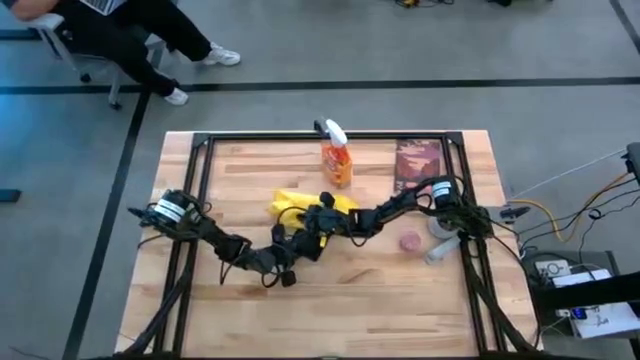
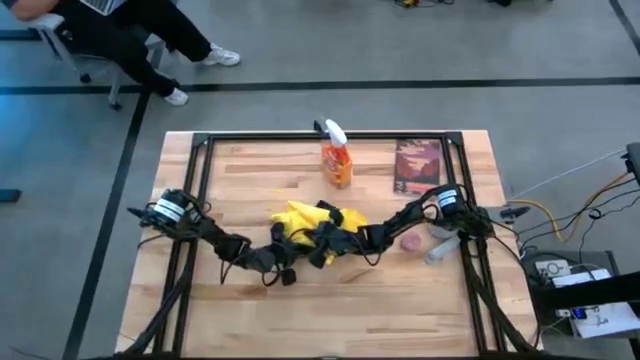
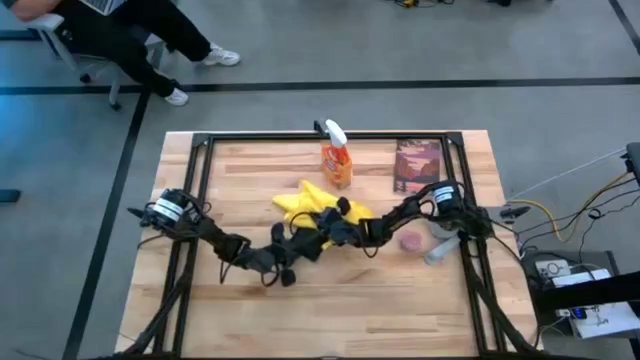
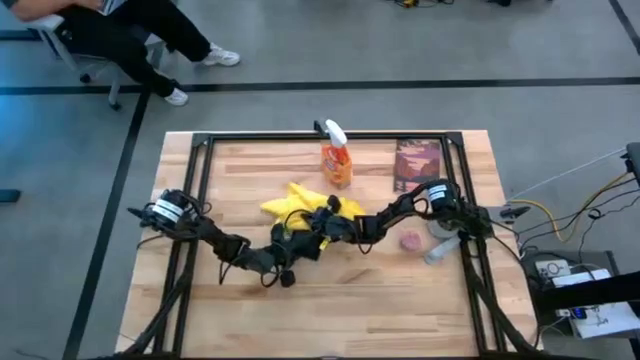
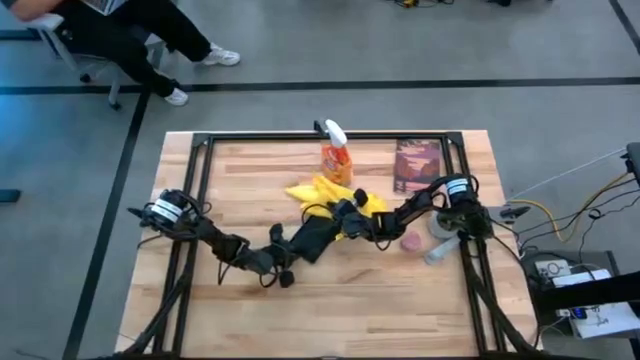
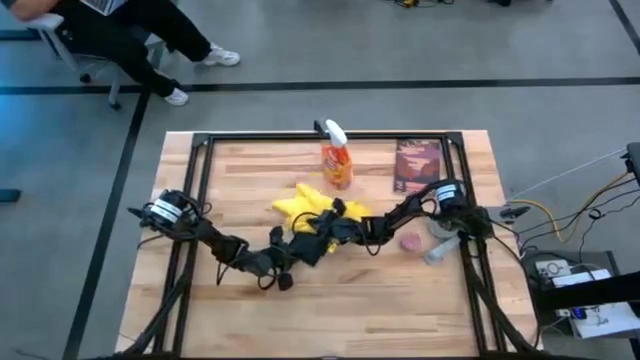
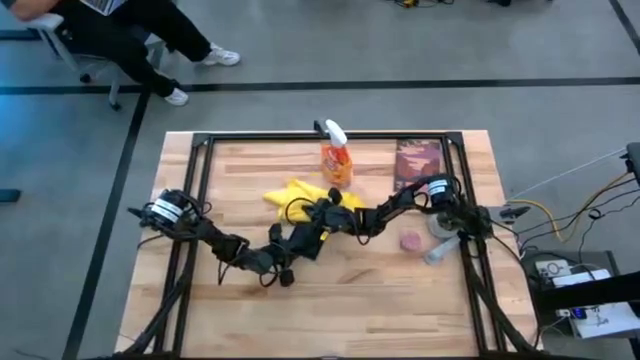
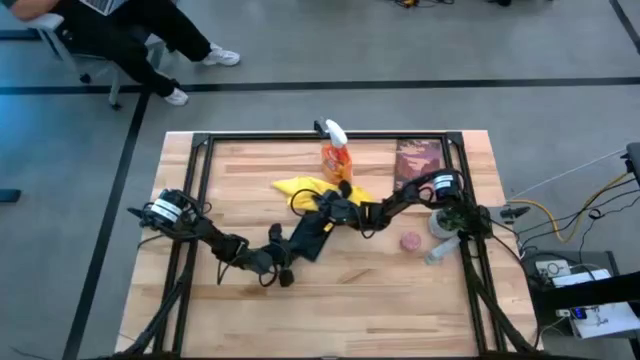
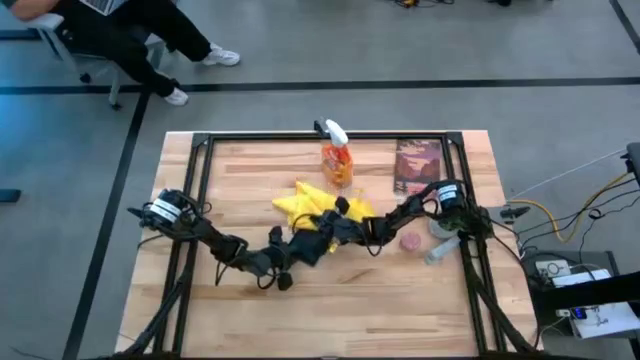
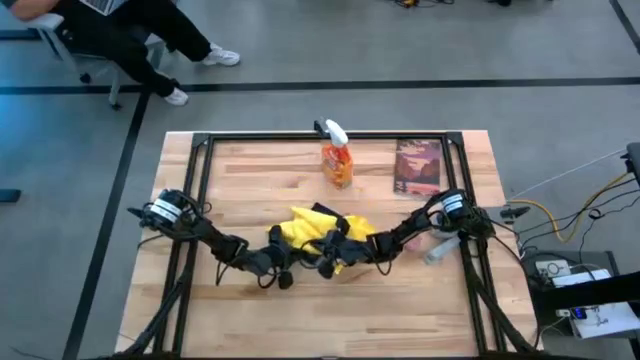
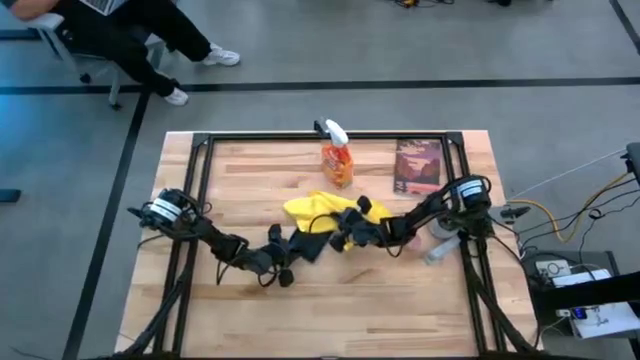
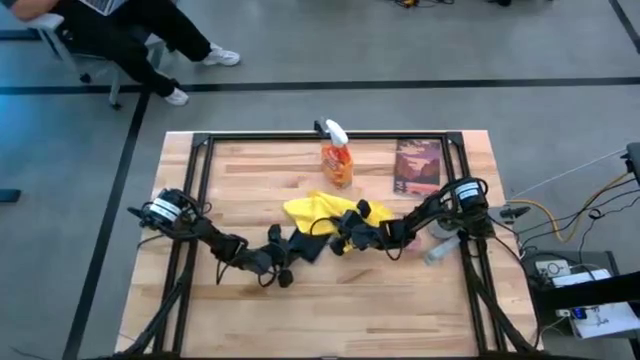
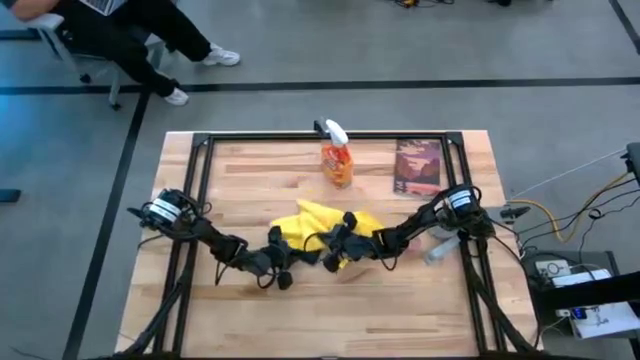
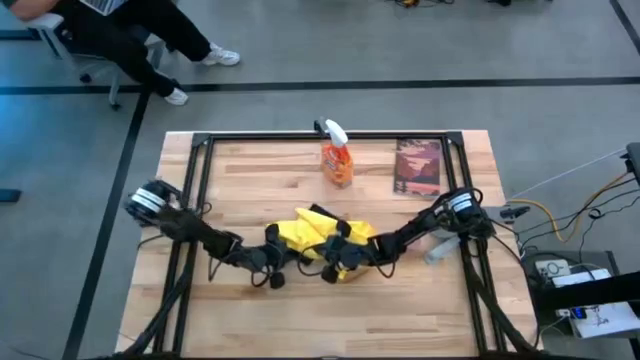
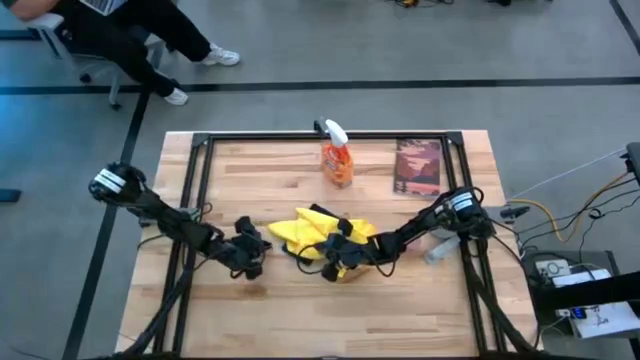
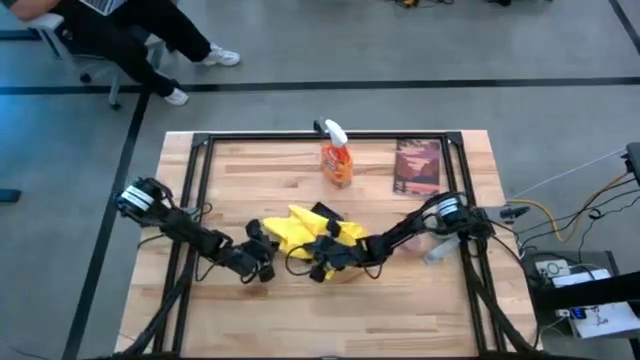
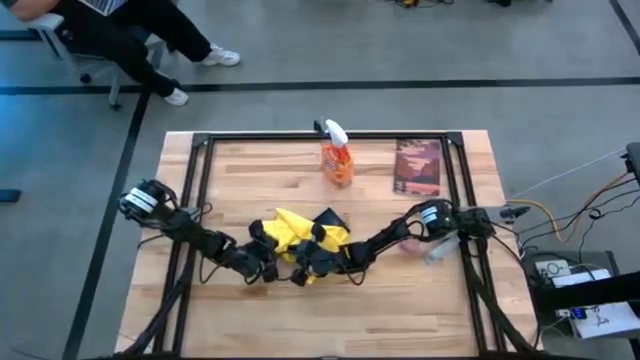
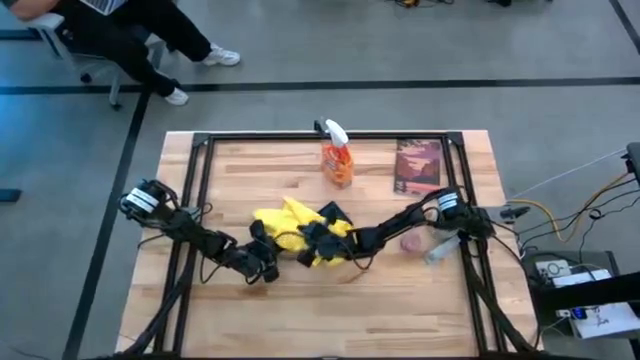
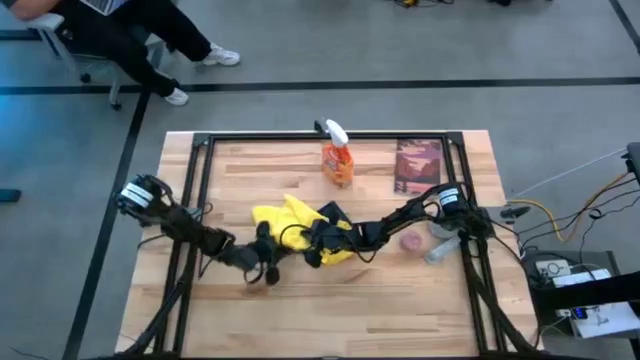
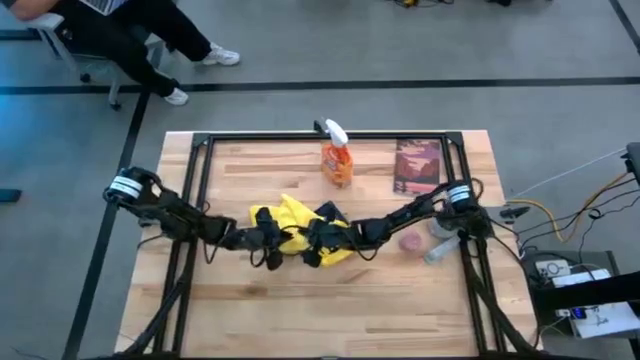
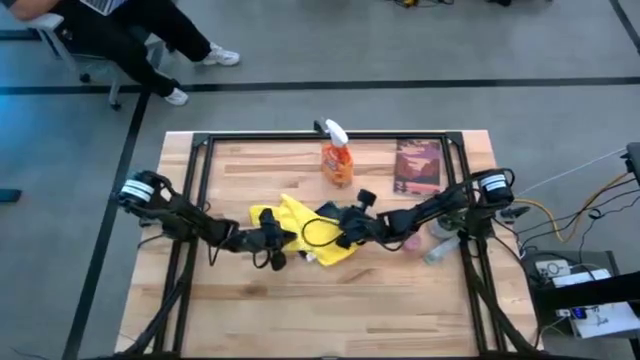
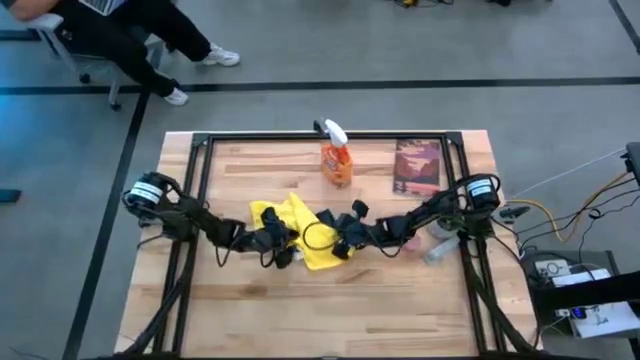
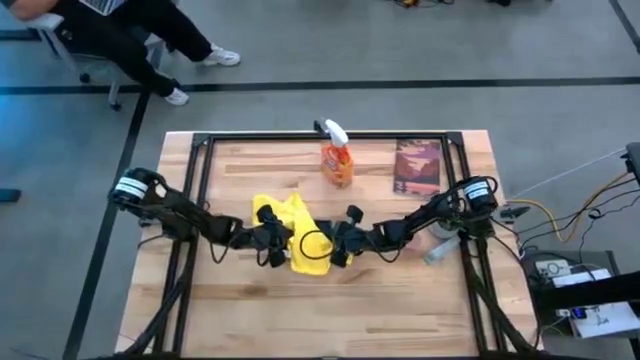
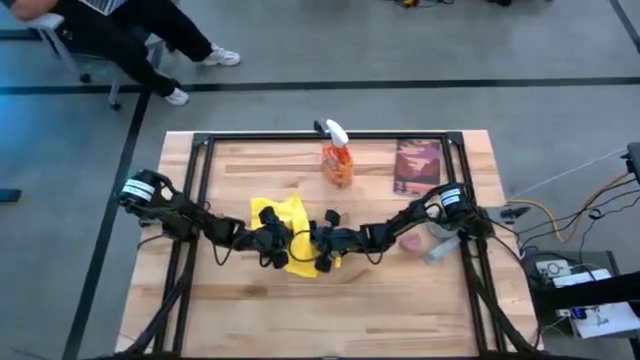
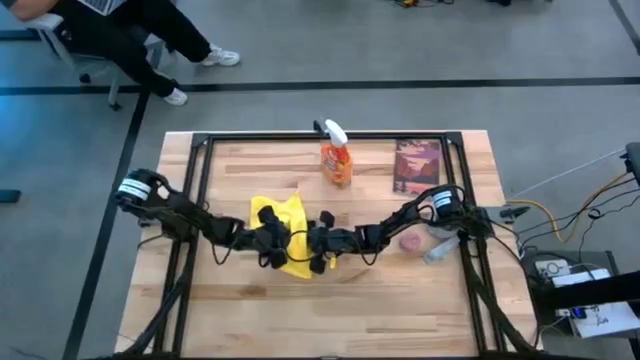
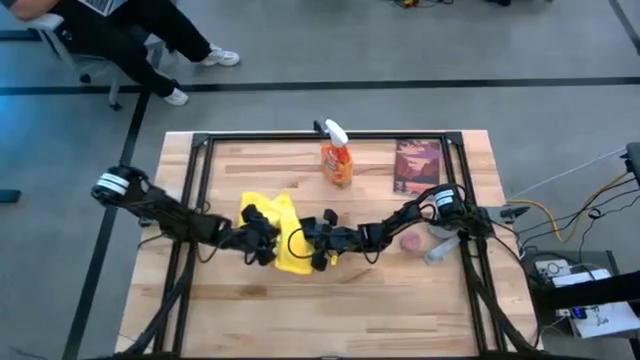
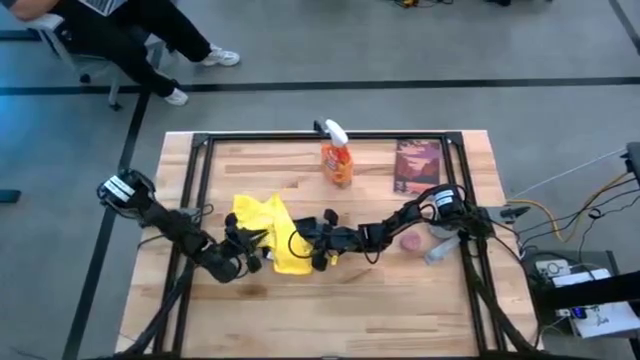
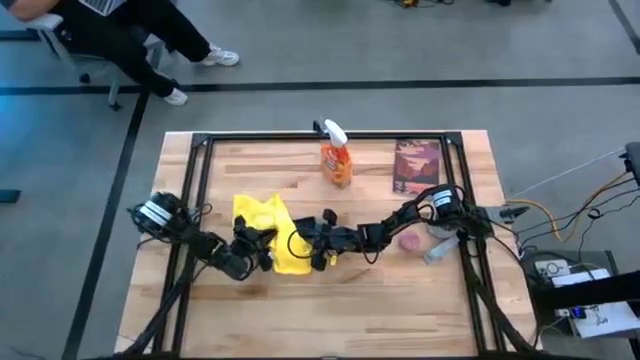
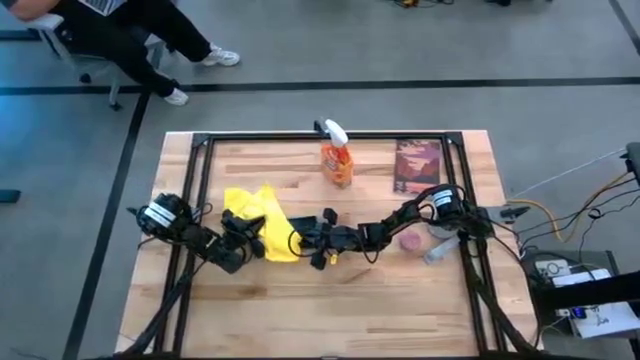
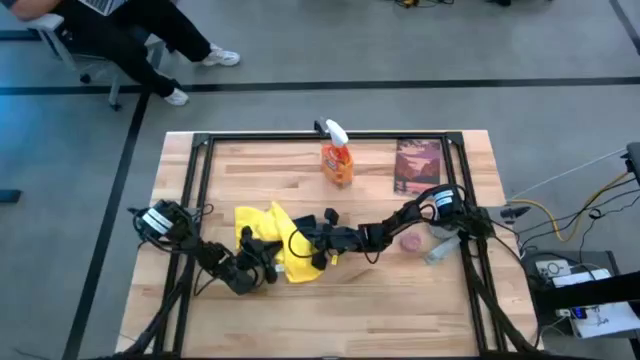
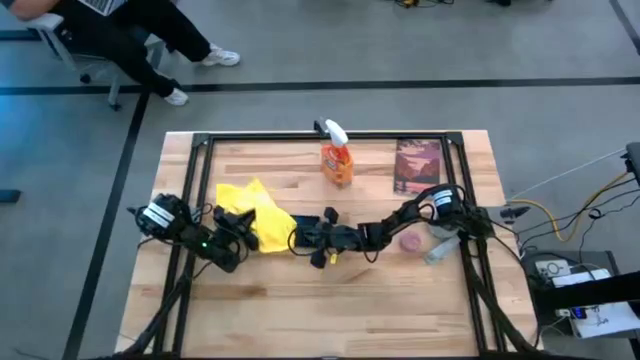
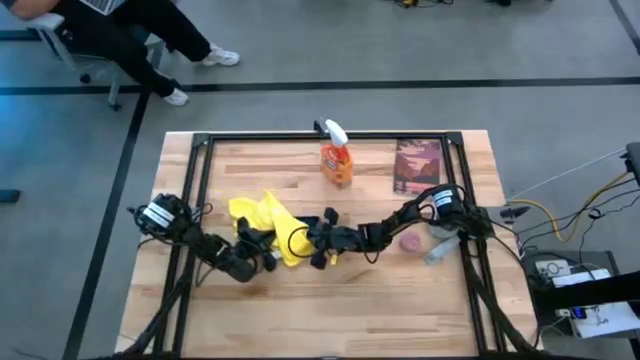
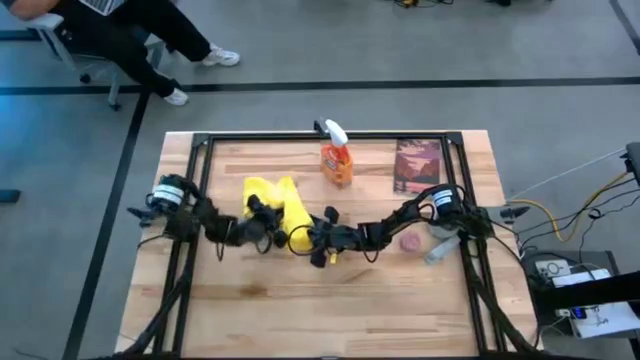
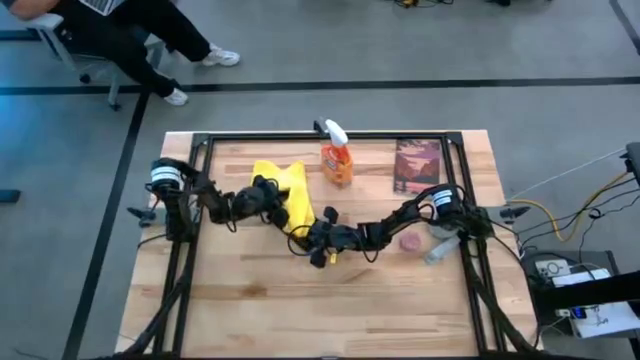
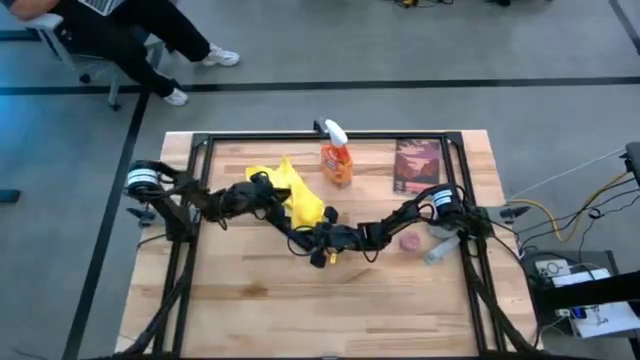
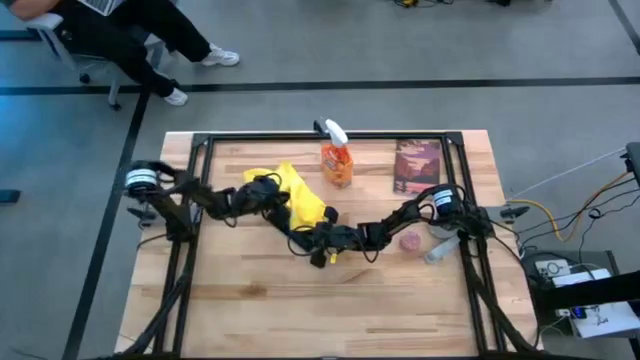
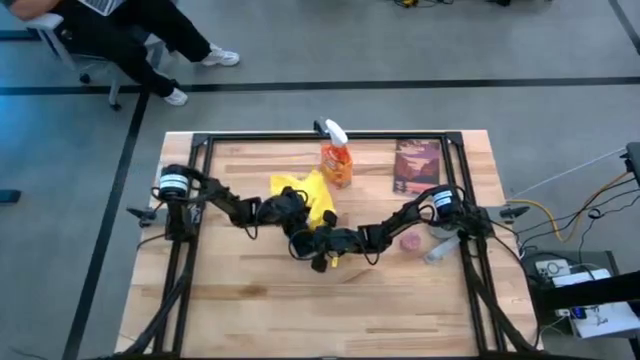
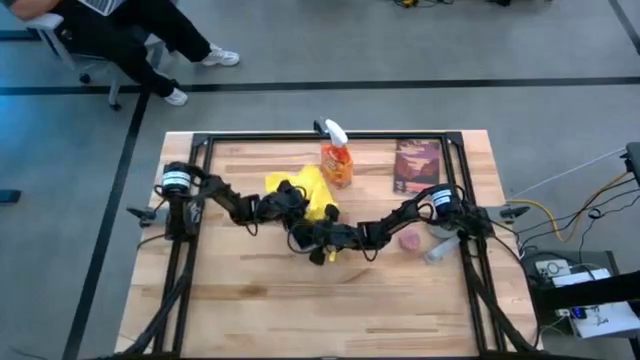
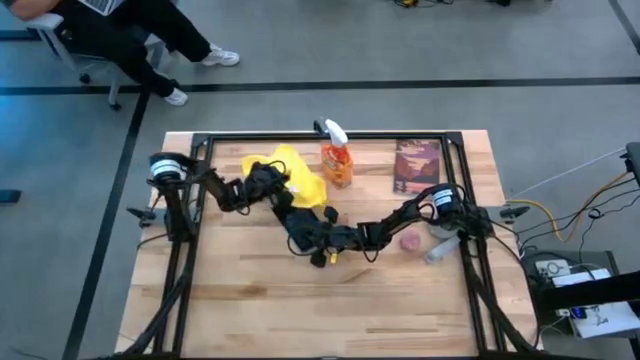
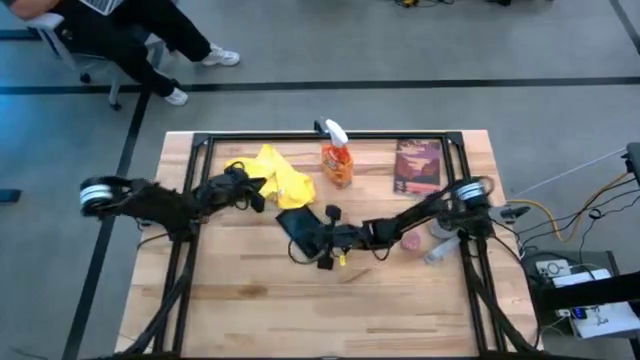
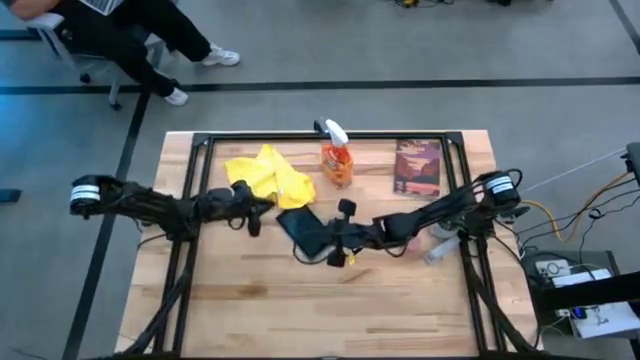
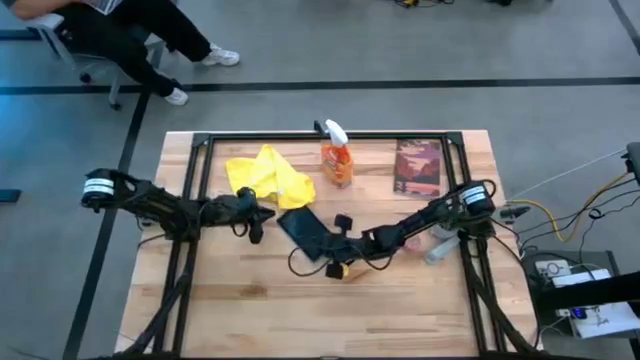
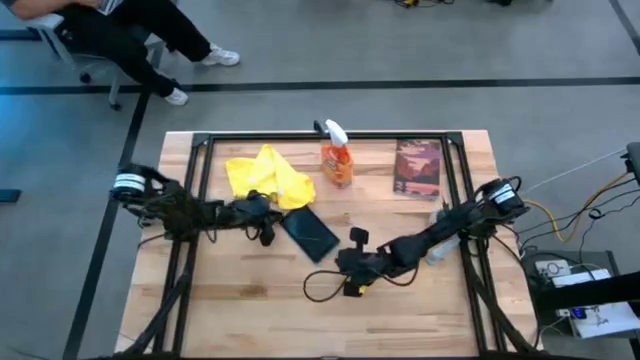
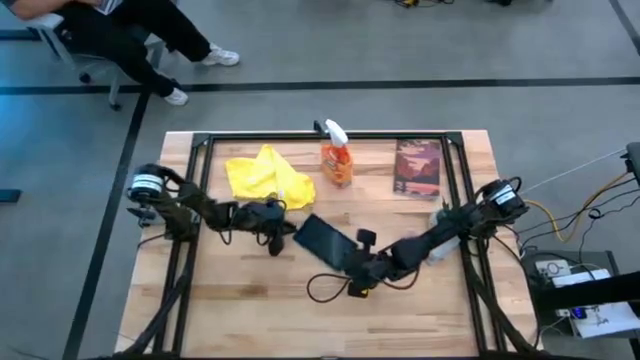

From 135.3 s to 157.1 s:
Task: Apply microfiber cloth
Wipe the front and back of the tablet with the yellow microfiber cloth

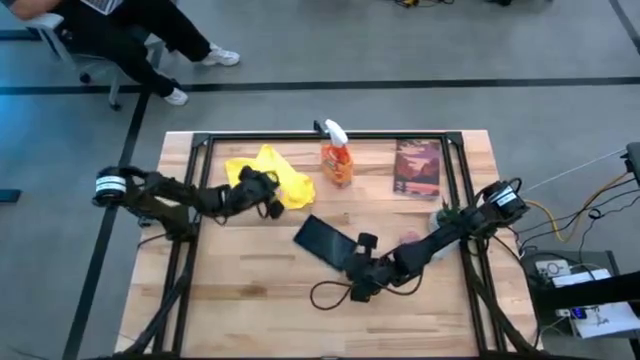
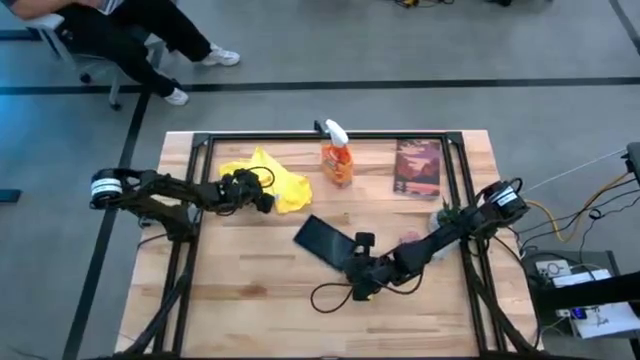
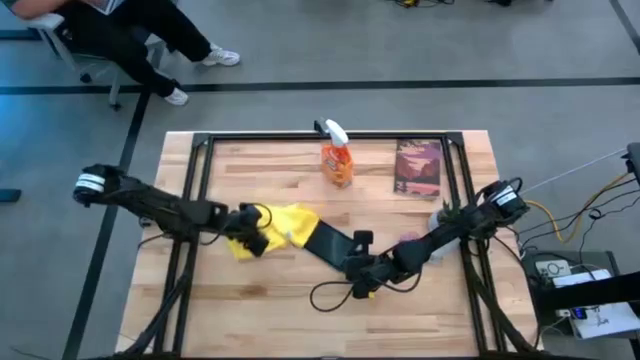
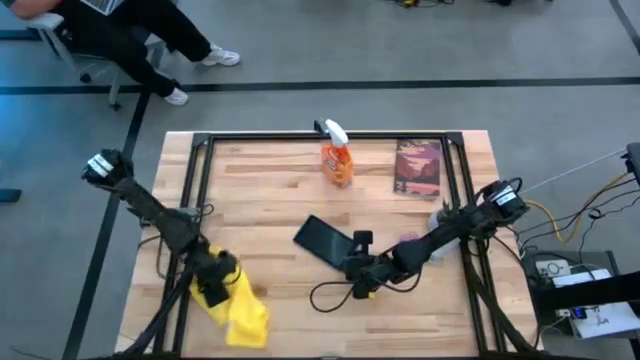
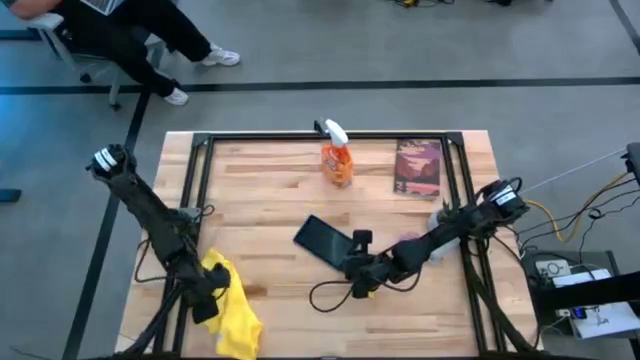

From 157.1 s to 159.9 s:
Move the yellow microfiber cloth to the bottom left
